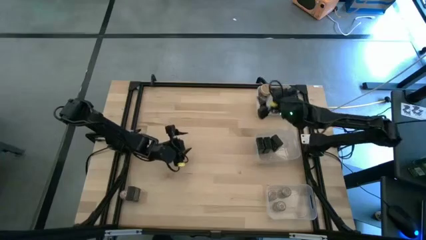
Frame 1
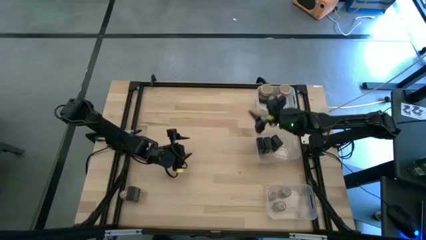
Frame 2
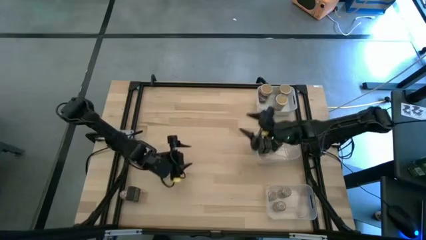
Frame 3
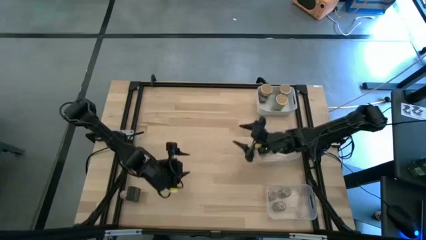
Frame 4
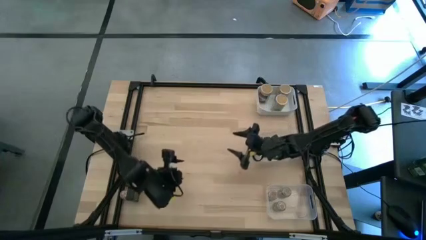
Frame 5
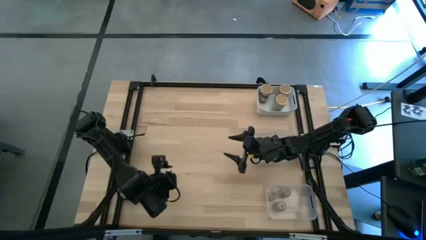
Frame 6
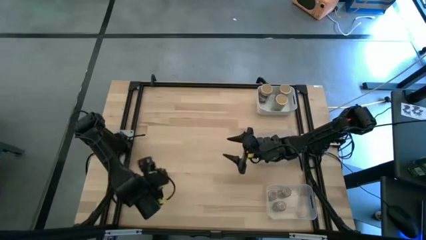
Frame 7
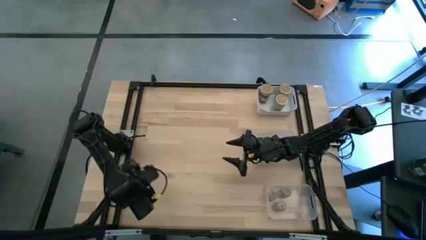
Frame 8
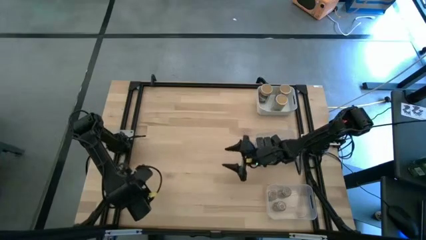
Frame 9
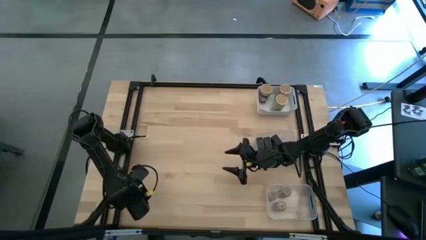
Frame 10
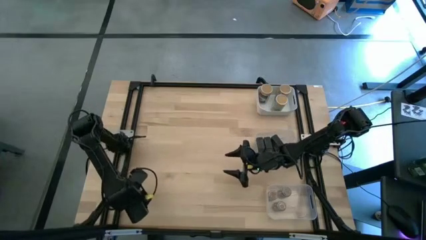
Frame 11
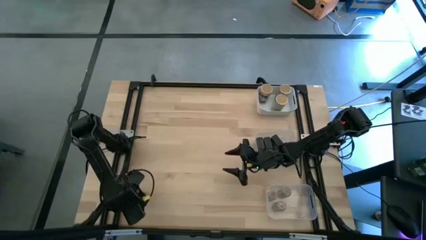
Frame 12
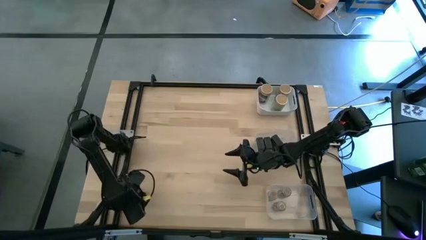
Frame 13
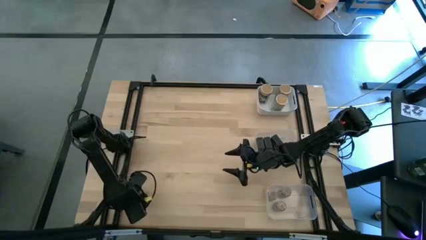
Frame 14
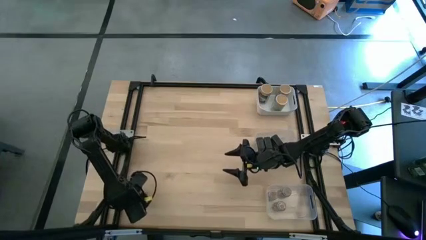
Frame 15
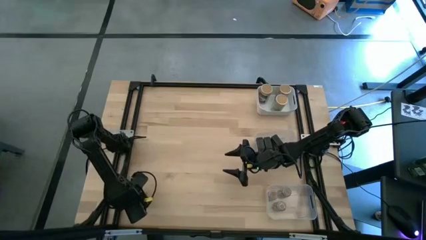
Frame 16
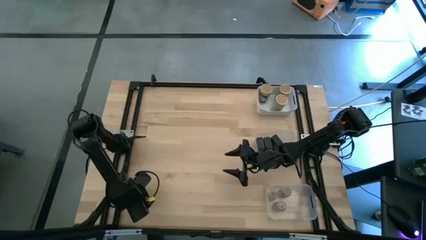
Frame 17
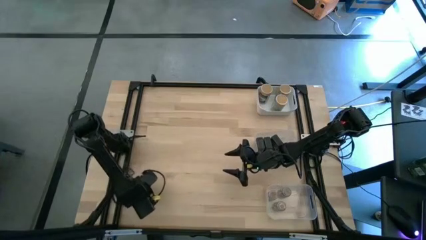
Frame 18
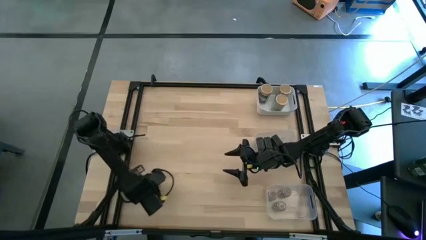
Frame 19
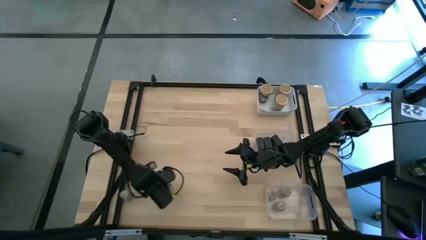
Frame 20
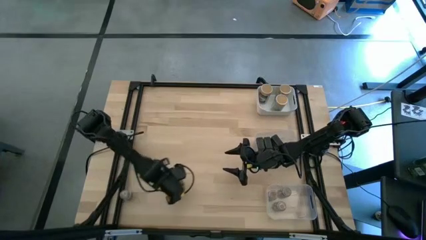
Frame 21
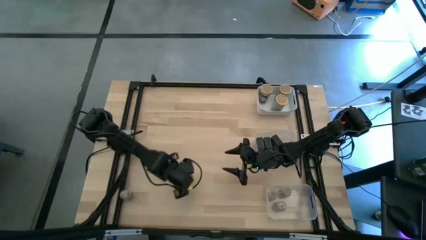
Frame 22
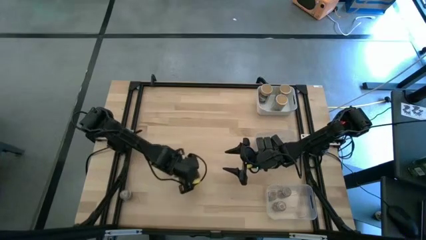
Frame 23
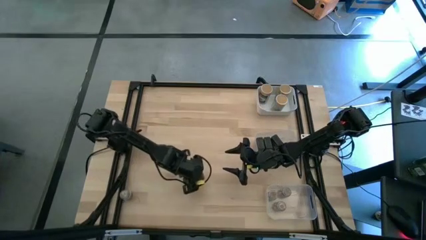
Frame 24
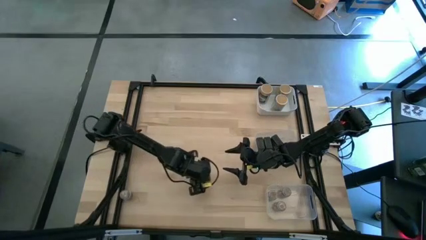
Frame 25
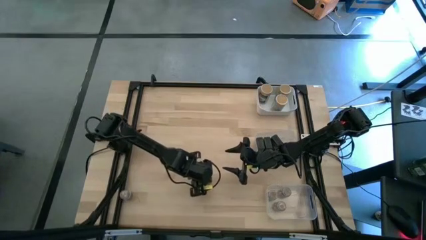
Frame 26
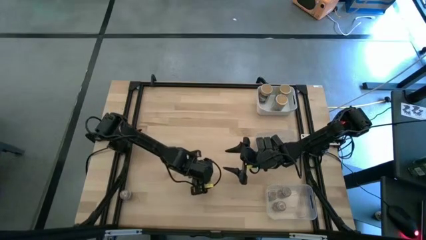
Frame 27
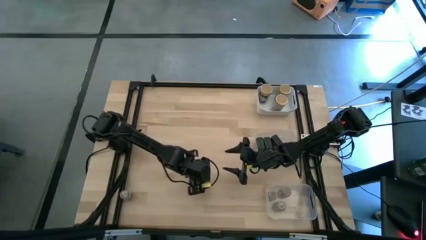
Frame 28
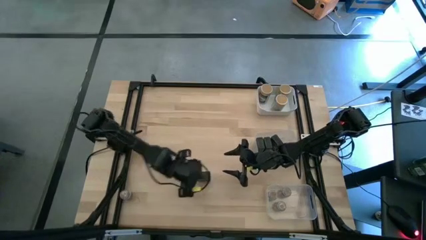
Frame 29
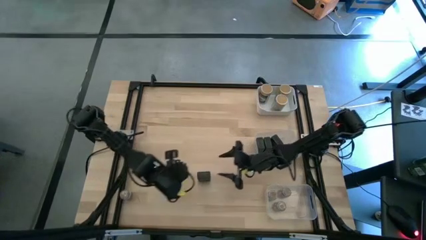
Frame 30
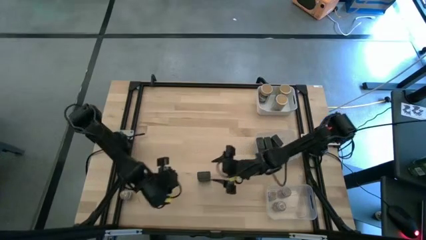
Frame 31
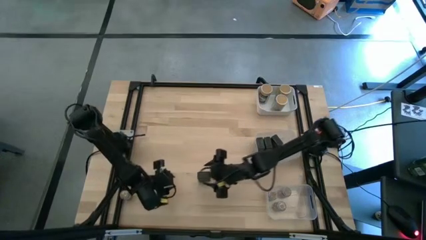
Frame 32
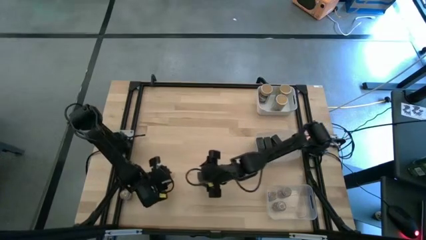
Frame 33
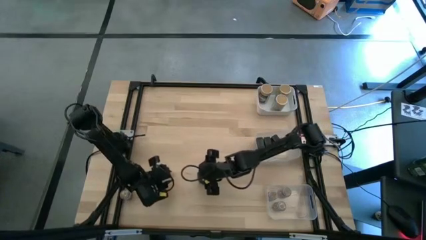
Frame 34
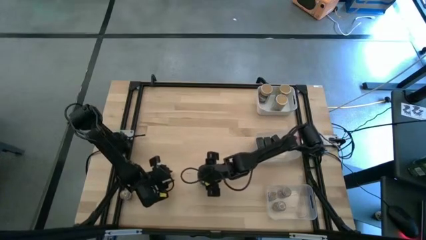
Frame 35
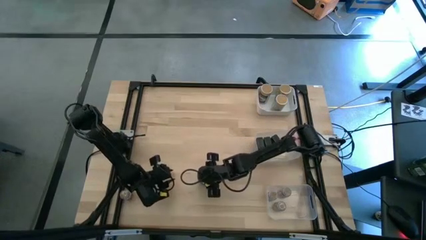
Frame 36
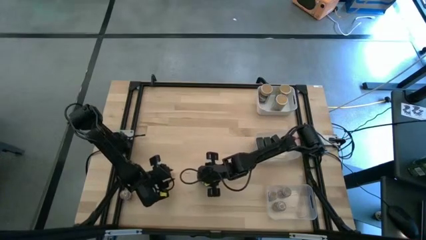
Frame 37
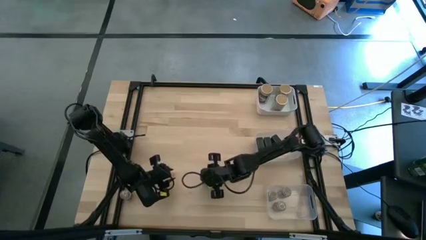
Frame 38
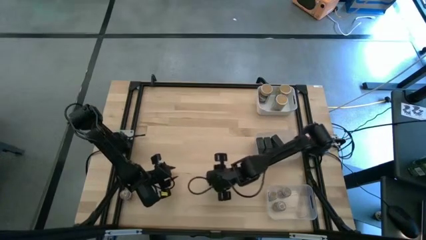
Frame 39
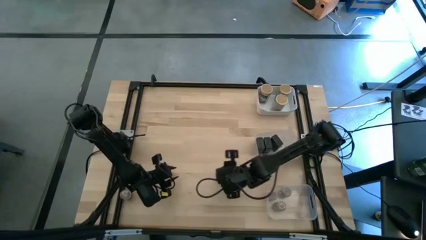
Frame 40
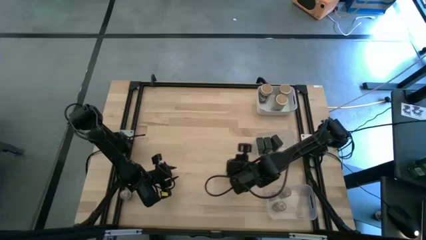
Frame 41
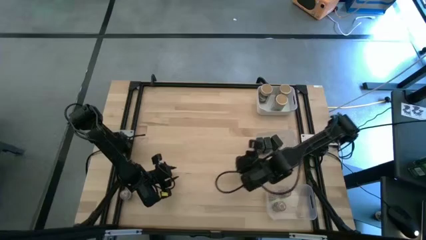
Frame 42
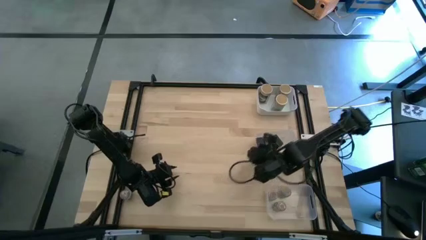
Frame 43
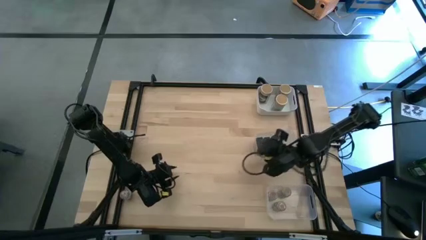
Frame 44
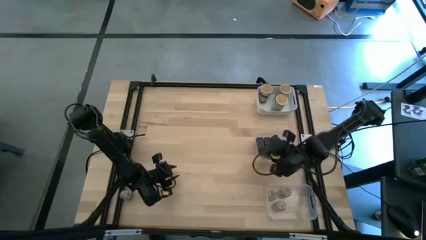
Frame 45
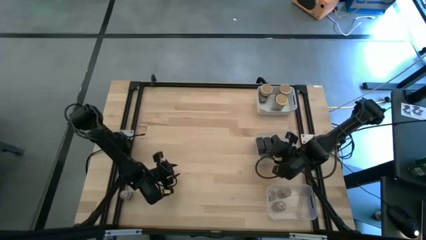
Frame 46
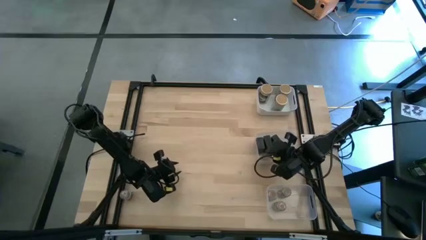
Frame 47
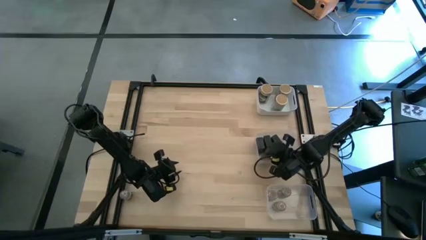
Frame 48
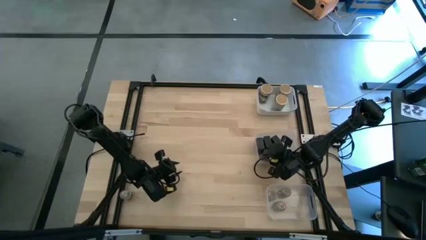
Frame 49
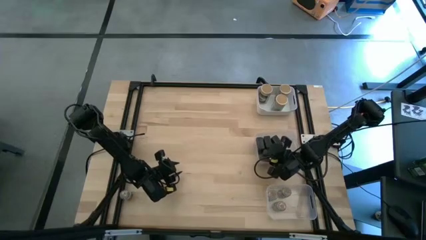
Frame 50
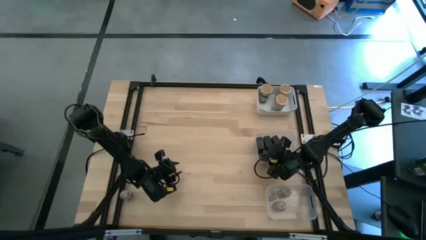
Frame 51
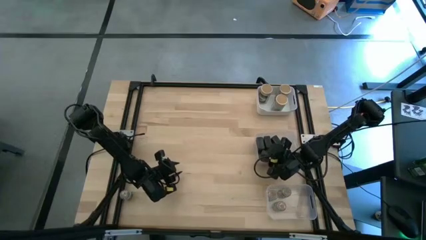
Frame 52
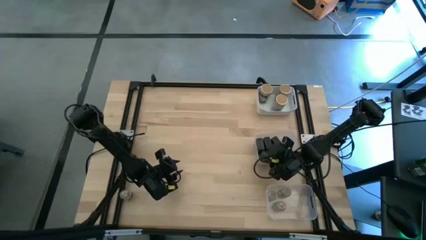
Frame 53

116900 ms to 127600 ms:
Task: Sort spices by type
Put the black seasoning container into the top transparent bin

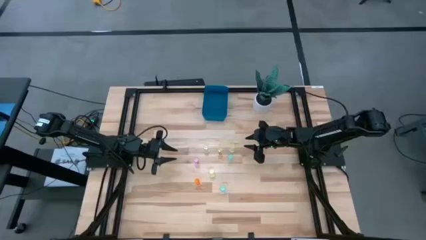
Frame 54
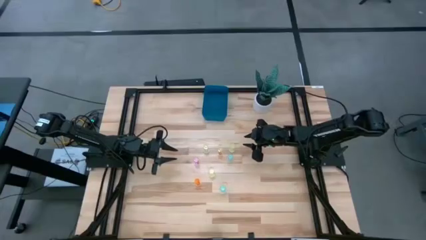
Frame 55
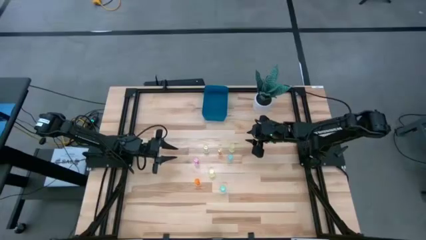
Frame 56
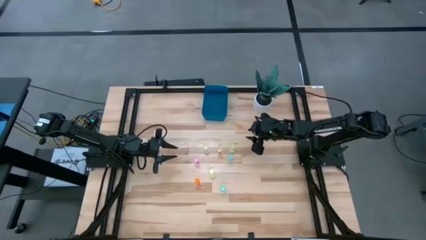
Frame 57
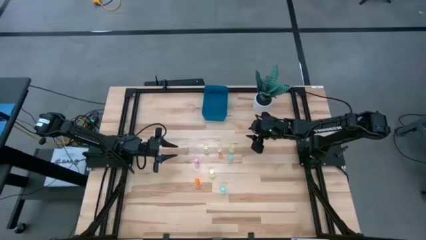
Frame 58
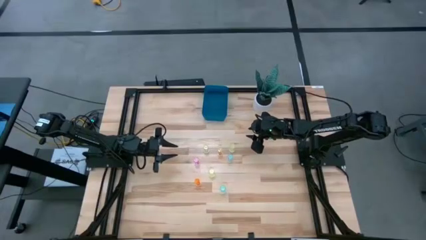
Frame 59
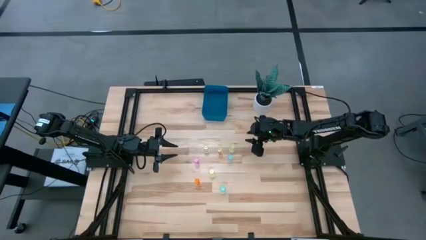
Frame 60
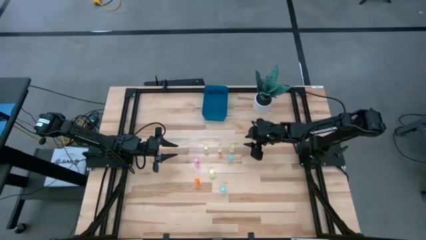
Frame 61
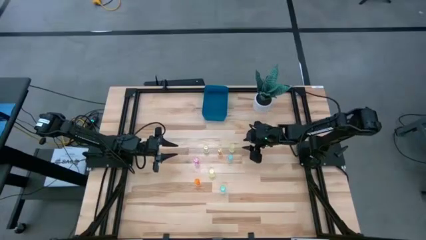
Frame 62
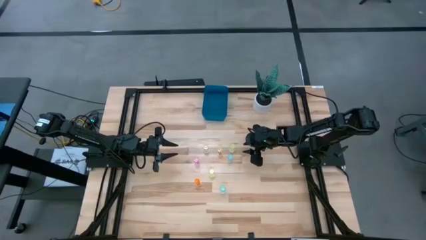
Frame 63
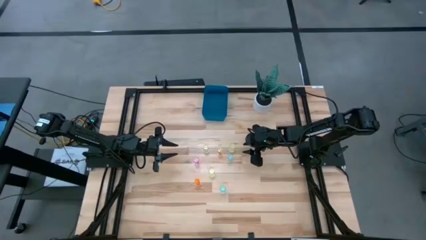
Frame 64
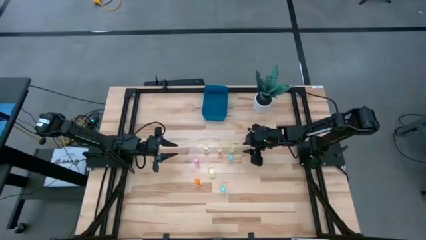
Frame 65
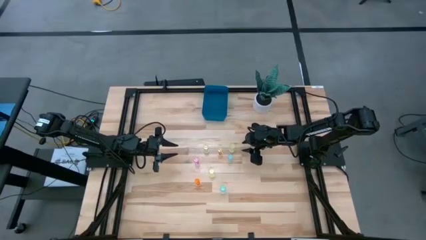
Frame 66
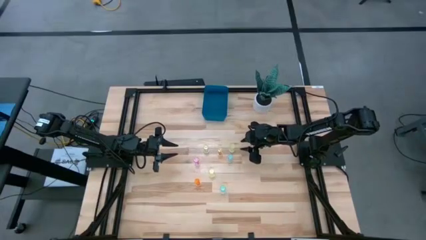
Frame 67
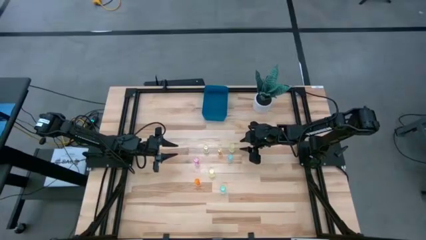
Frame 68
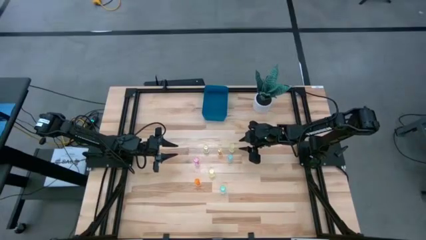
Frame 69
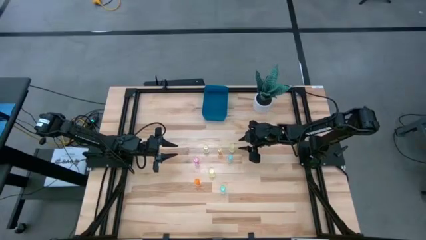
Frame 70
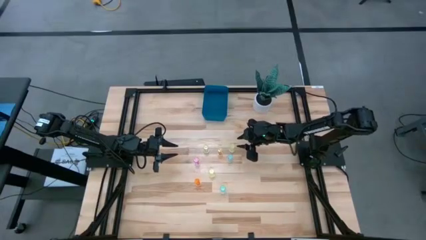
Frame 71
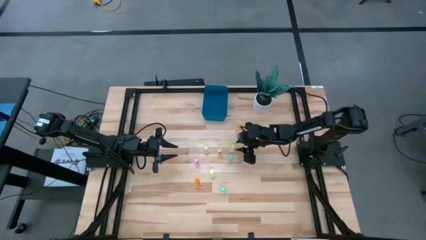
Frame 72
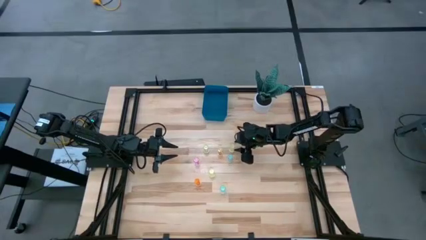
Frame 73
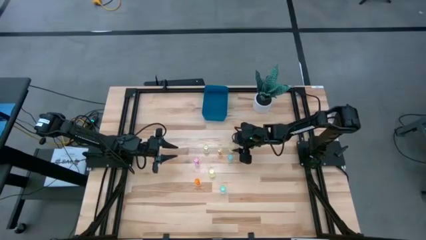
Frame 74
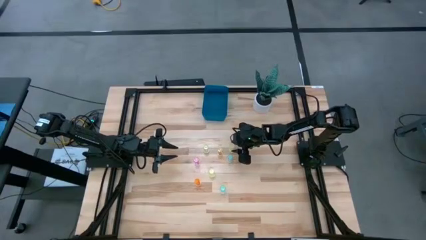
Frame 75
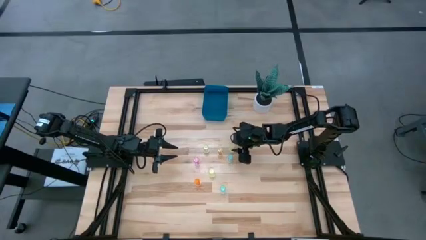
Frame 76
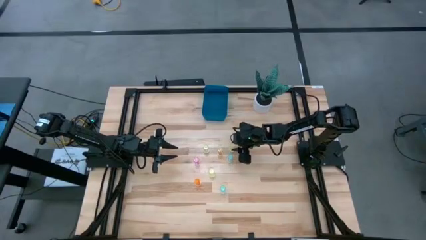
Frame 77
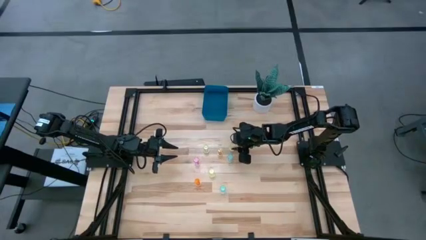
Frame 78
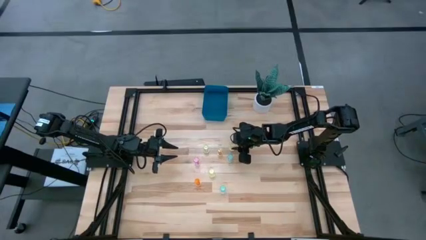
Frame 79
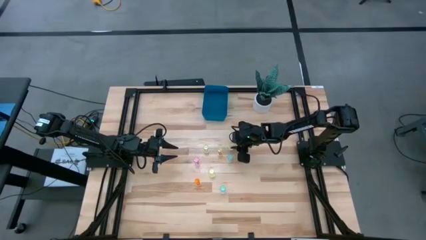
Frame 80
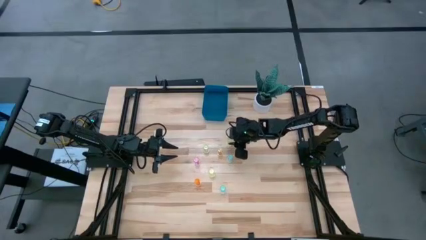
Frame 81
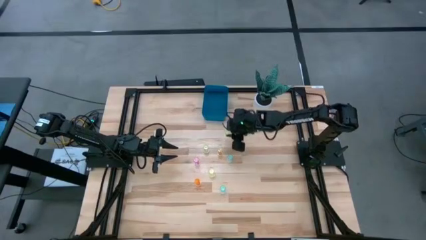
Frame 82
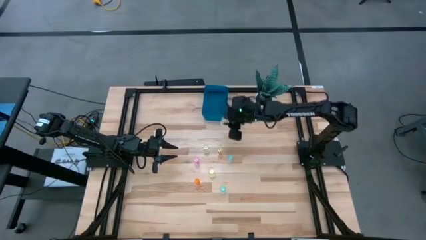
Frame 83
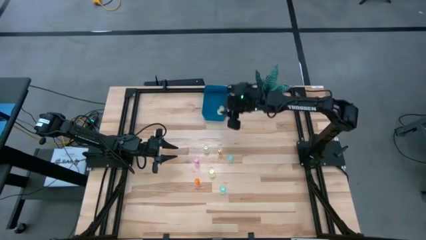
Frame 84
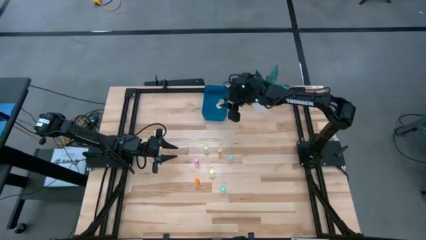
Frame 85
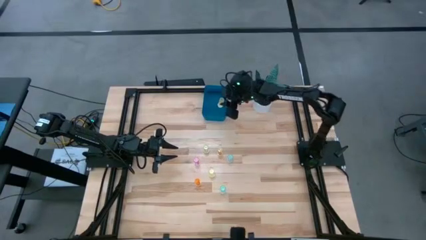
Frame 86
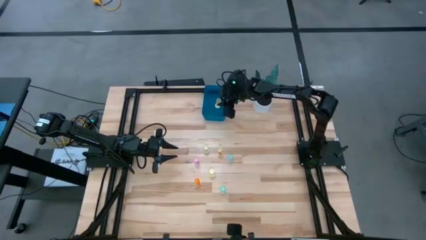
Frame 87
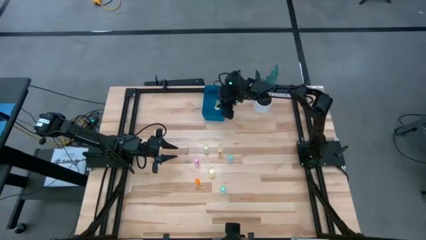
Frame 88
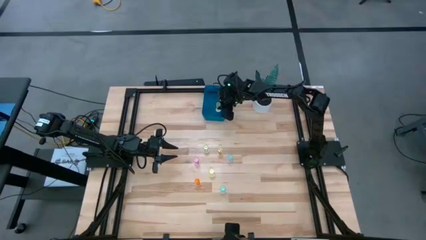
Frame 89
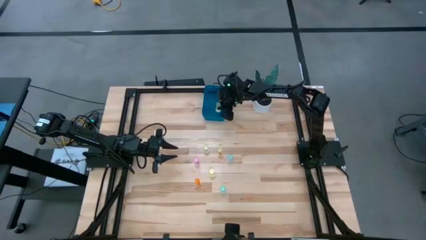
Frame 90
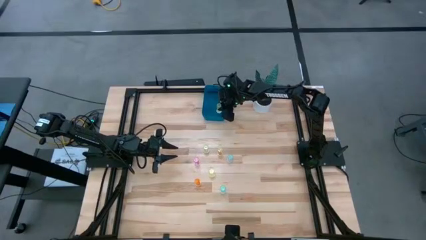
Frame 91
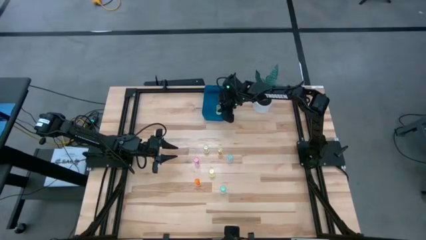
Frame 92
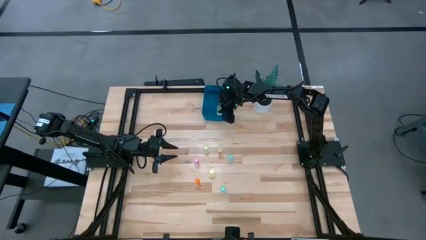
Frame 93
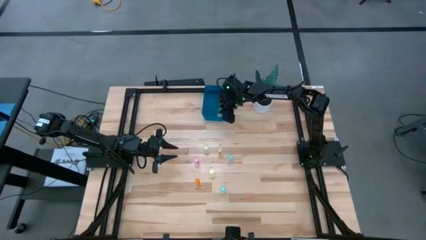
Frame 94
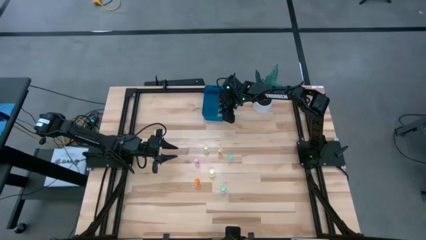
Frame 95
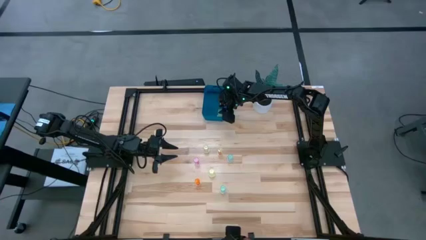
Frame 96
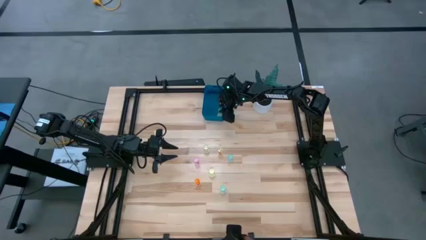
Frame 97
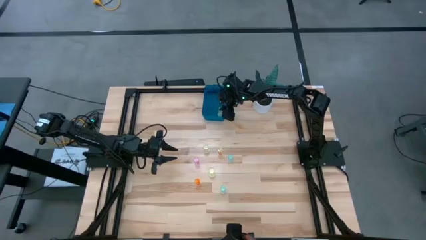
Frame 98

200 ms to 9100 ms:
Task: Pick and place pill bottles into a basket
Put the yellow pill bottle into the blue container
